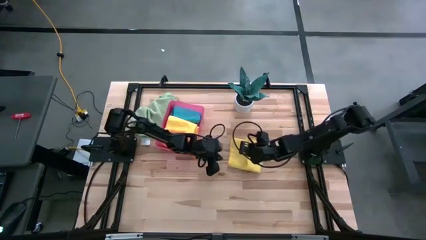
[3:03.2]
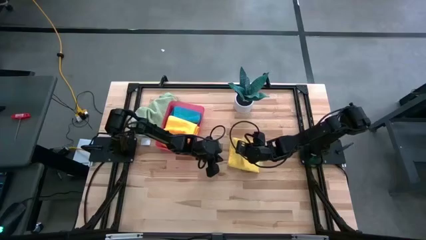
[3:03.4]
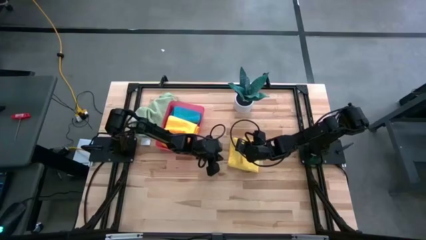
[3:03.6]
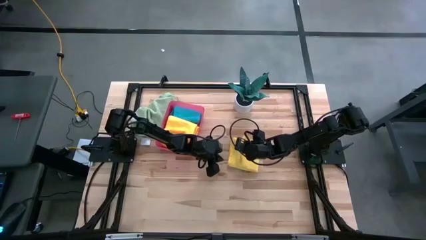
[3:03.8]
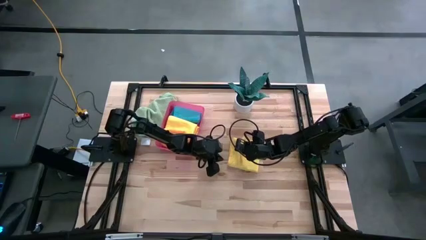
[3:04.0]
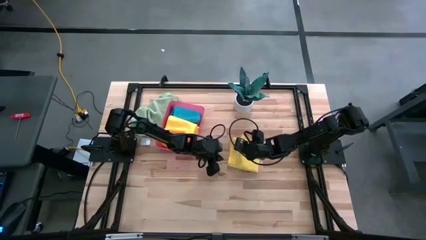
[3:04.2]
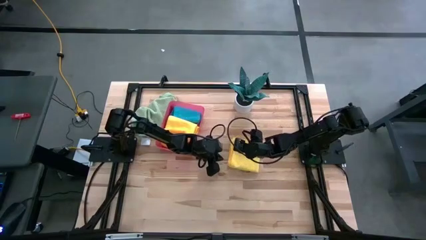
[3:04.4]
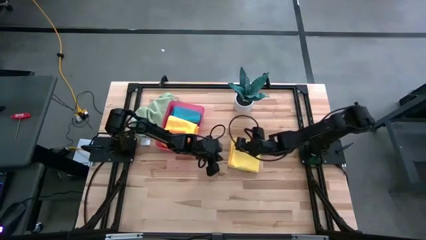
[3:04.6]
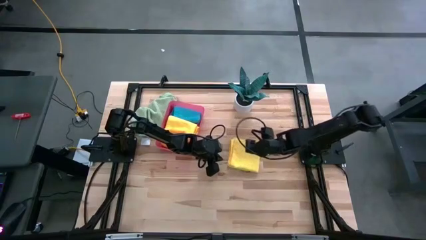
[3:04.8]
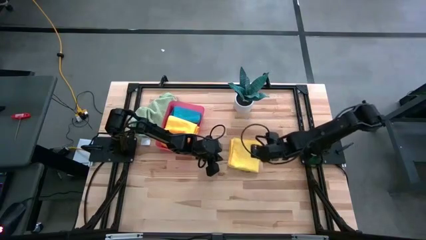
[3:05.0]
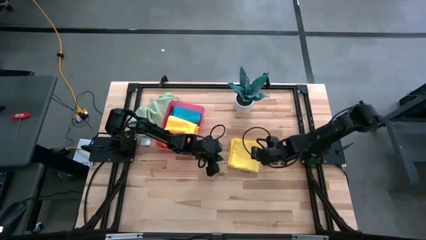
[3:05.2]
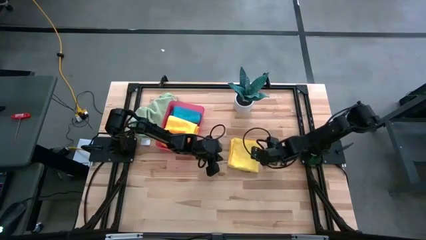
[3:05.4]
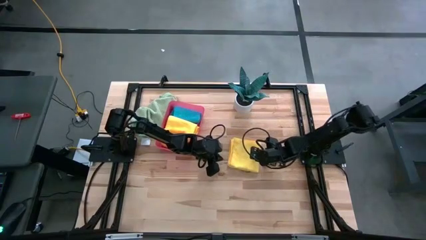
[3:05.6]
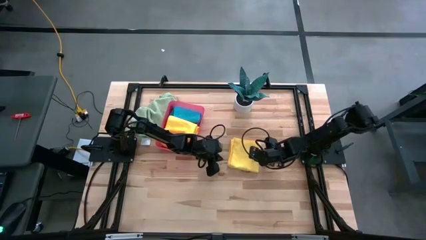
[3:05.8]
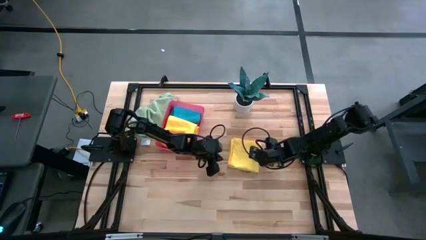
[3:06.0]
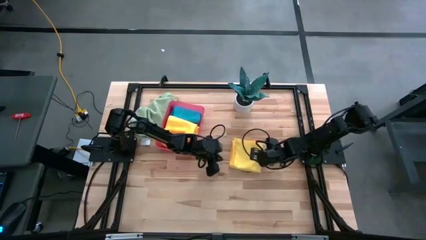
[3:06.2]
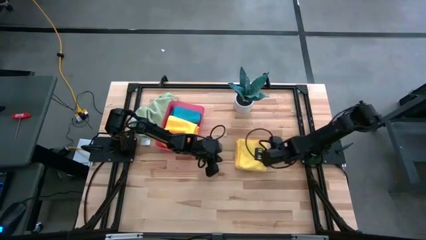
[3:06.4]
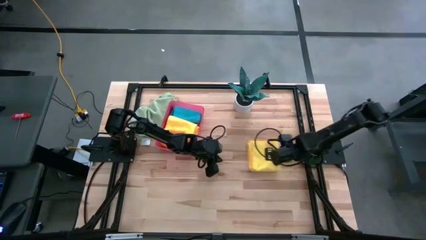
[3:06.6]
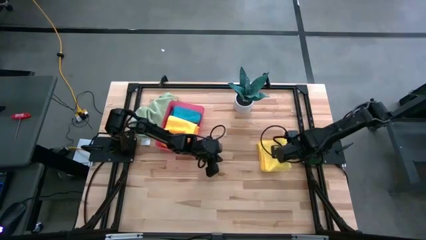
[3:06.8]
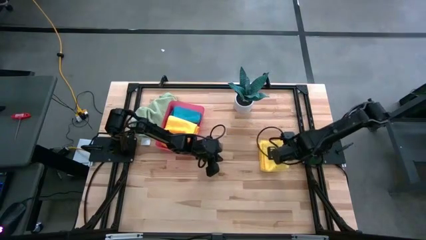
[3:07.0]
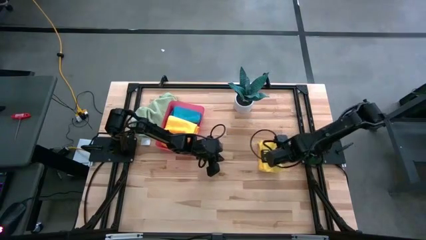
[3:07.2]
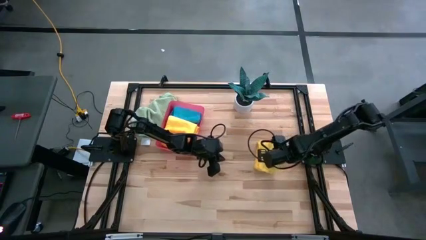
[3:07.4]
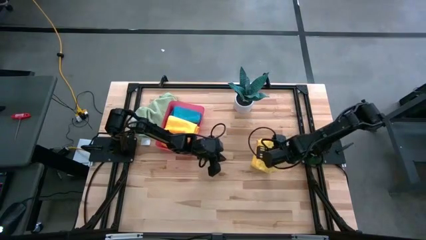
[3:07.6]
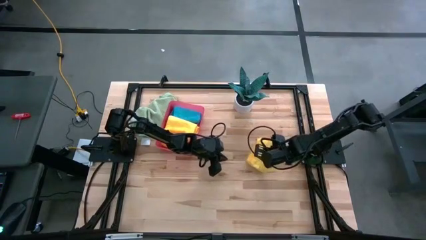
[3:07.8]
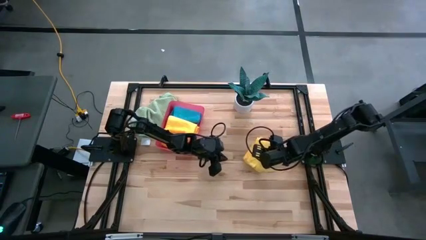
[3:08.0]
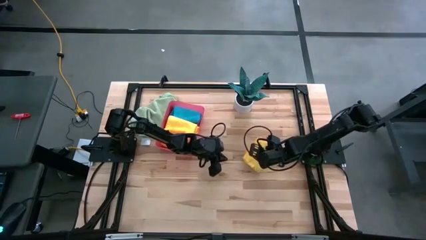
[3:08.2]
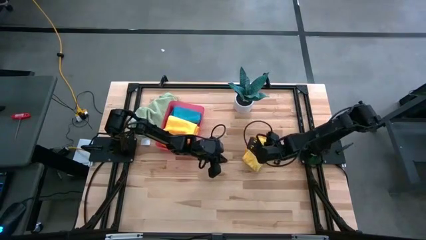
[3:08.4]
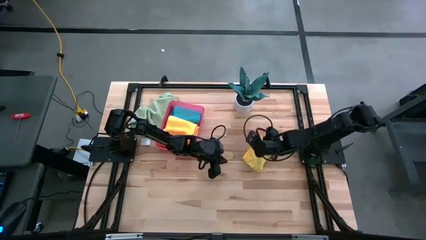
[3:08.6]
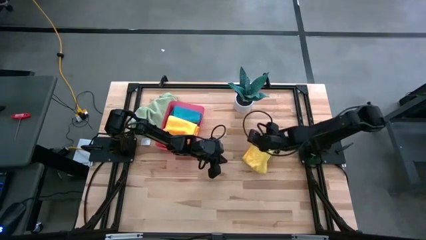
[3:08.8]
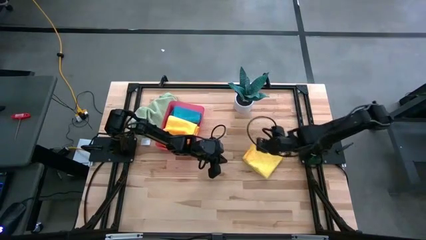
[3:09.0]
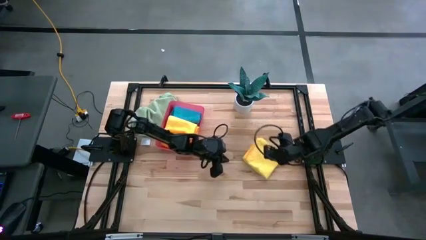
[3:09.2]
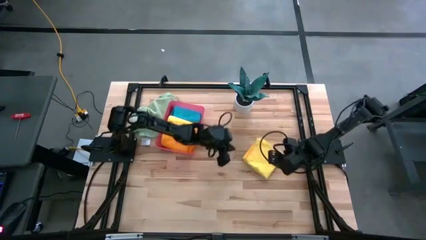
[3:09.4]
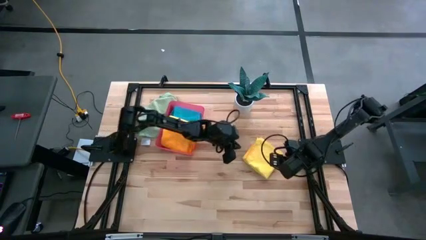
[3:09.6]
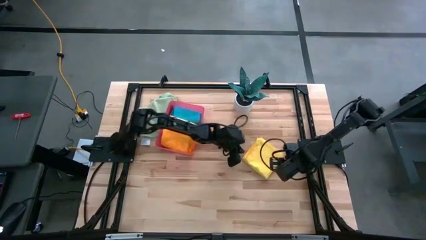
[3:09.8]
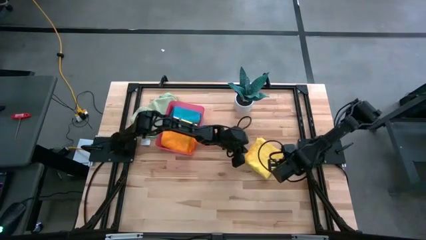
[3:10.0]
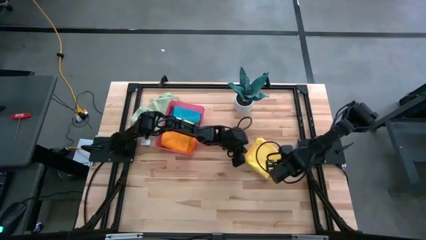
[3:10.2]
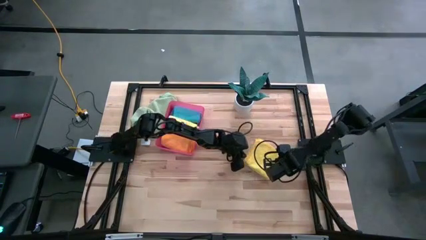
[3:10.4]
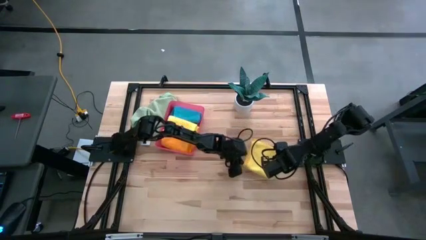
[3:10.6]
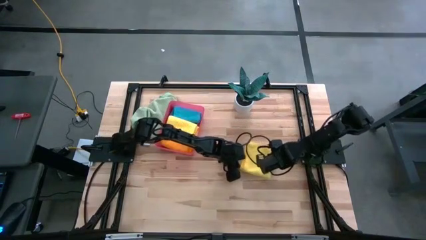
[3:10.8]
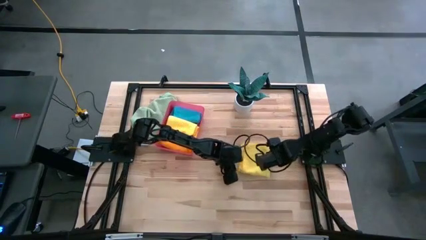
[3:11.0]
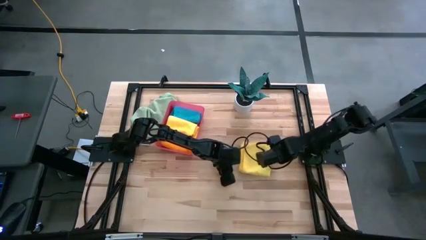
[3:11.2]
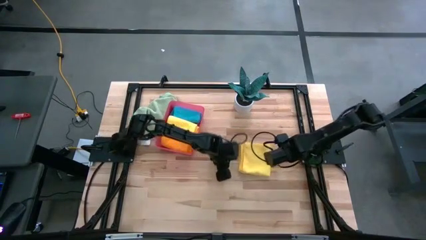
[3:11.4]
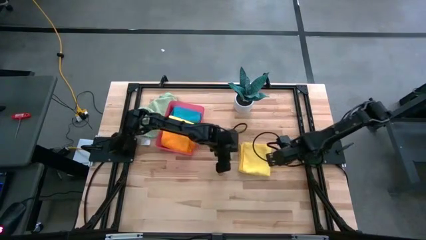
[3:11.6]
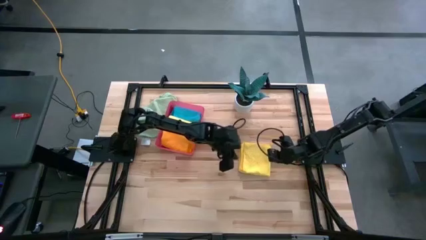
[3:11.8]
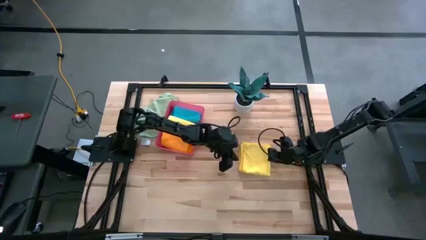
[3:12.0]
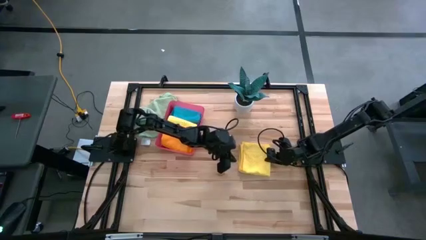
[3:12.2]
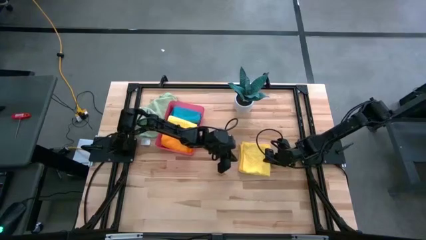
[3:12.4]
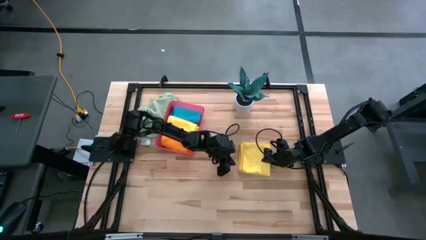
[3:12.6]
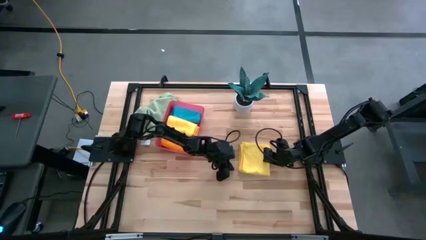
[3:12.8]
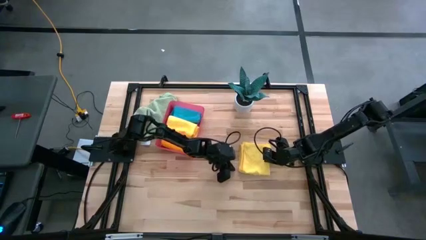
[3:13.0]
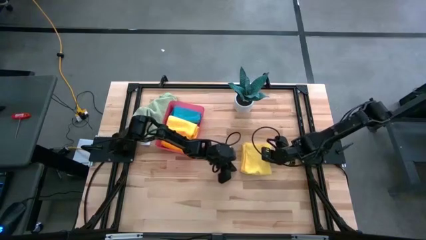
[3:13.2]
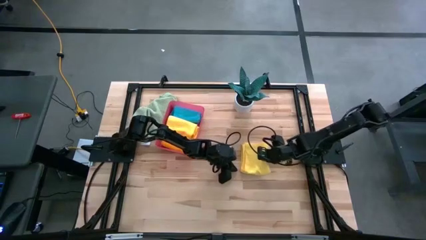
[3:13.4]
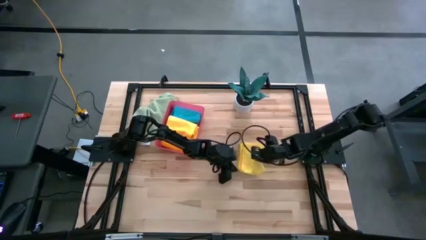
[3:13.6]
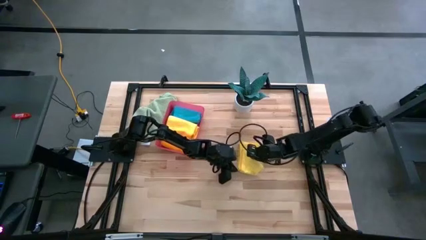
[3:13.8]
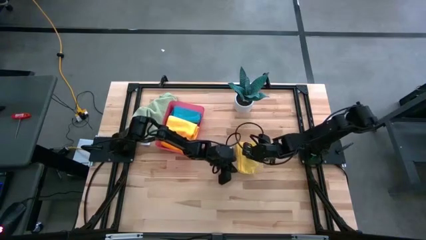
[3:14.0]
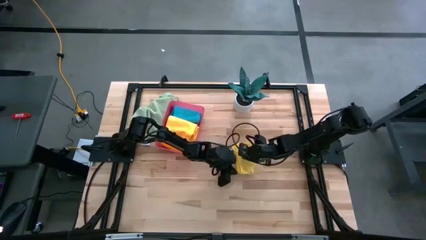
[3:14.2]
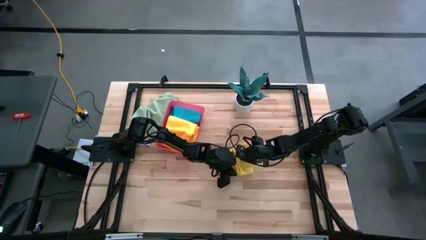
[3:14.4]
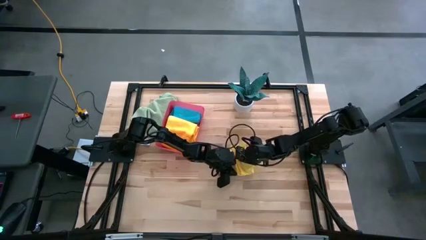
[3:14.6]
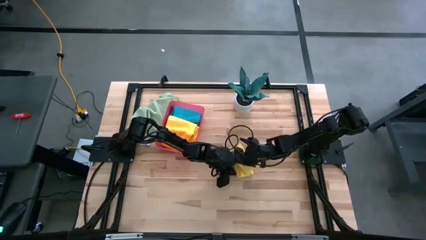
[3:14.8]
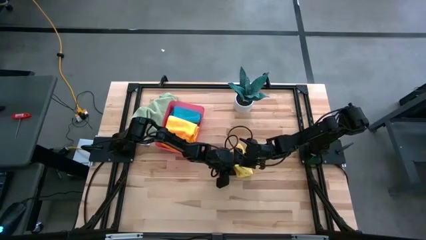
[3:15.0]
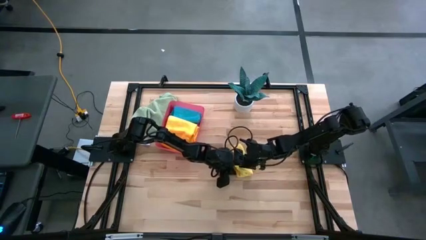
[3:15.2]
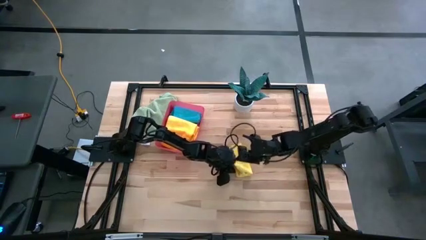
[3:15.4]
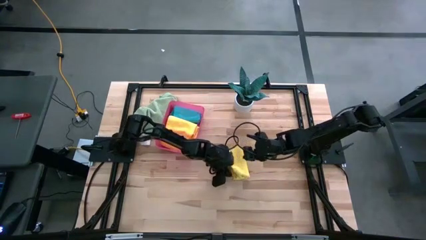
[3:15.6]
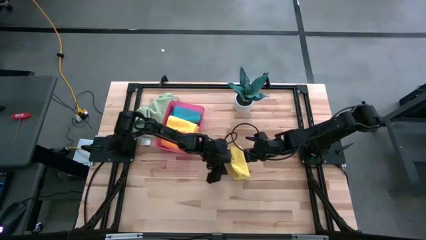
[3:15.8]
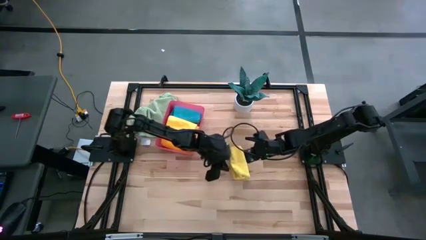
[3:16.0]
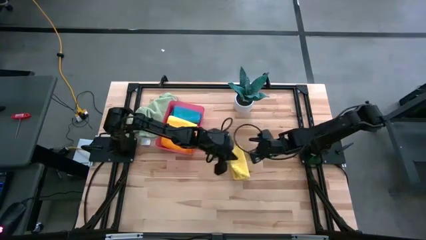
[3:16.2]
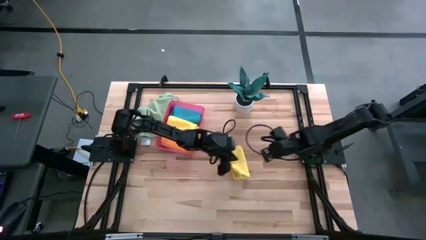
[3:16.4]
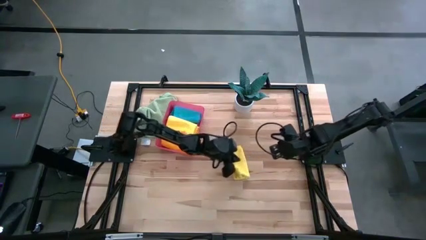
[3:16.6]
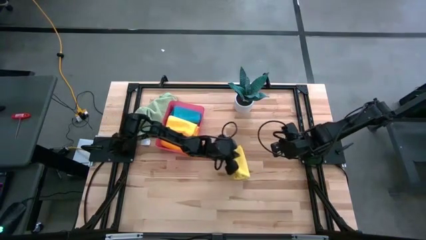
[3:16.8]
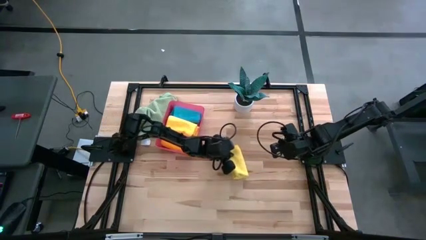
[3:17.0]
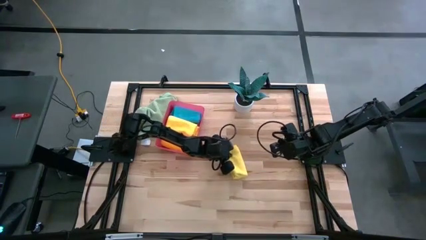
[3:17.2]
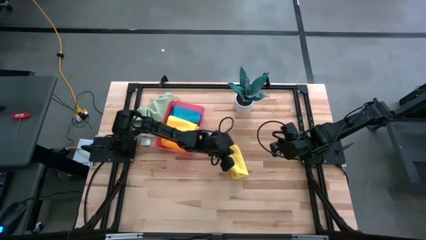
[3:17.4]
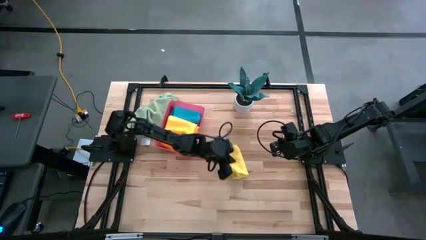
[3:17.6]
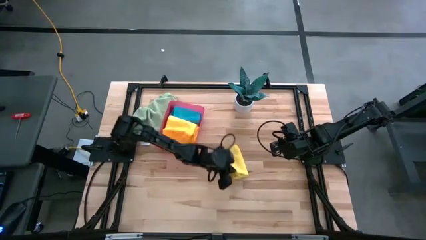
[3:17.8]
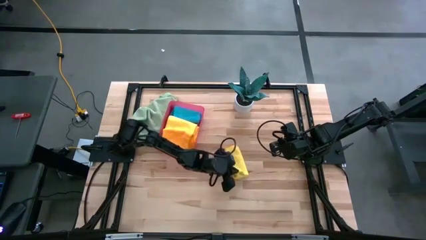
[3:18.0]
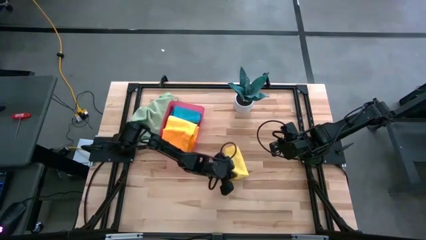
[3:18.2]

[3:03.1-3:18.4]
Task: Fold microfiber towels
Fold the yellow microfiber cloth

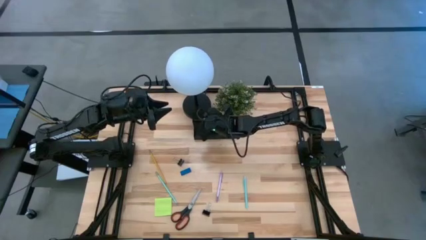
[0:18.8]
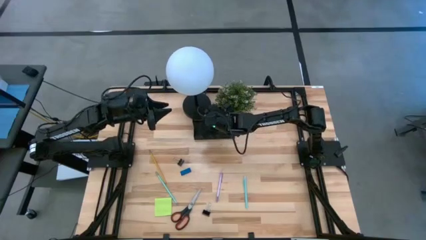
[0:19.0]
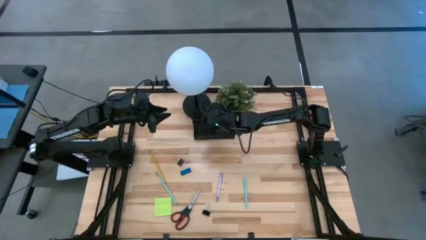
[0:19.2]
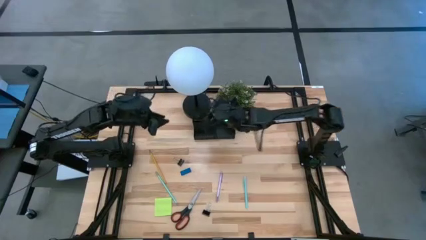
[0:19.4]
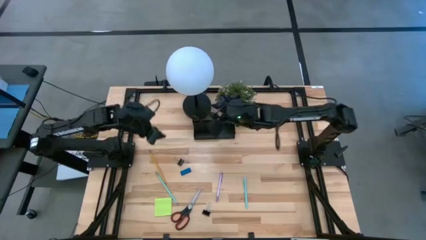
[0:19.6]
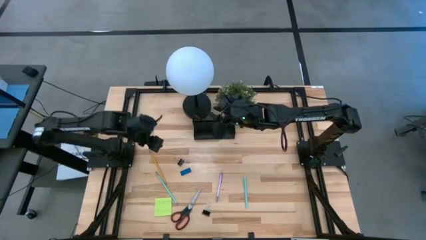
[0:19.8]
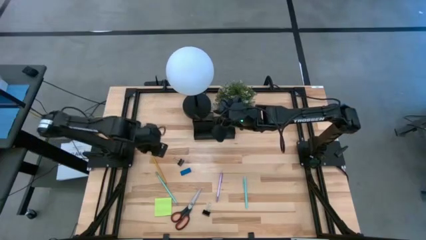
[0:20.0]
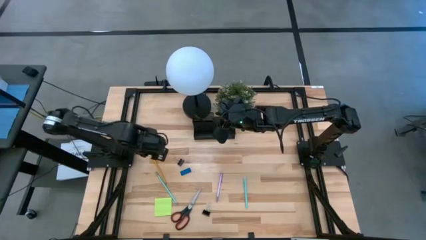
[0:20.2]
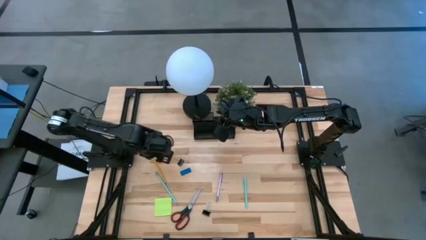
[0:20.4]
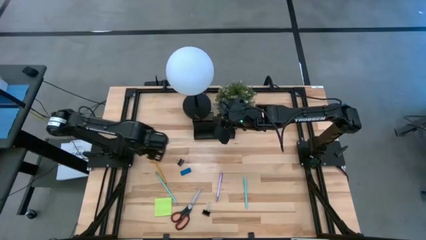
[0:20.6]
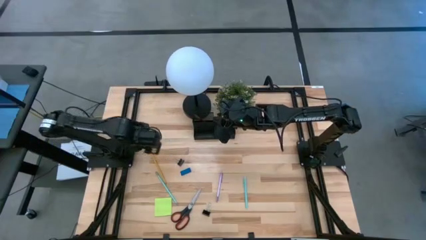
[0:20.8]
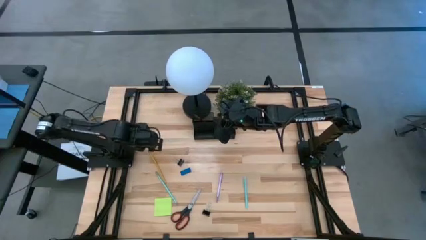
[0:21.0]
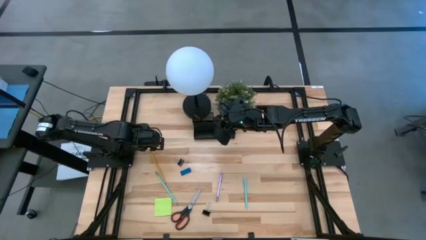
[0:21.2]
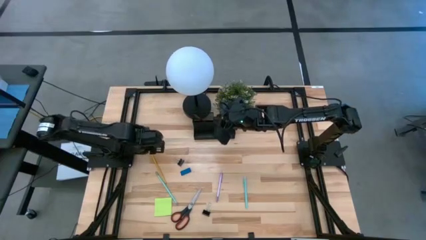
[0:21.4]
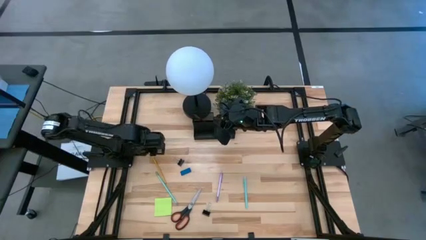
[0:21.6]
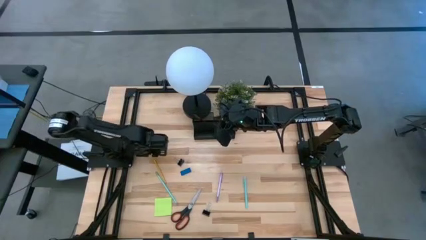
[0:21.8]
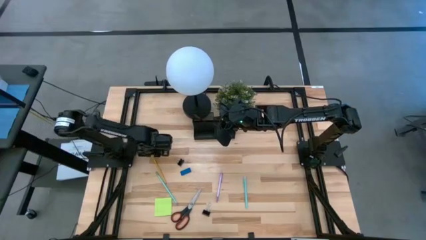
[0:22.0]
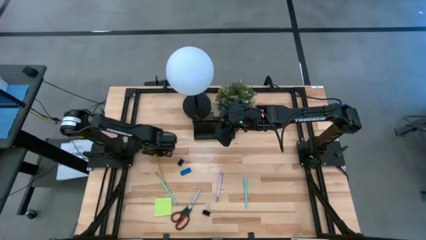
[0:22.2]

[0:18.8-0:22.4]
Task: Pick and place office supplies into organizer
Adjust the yellow pencil
